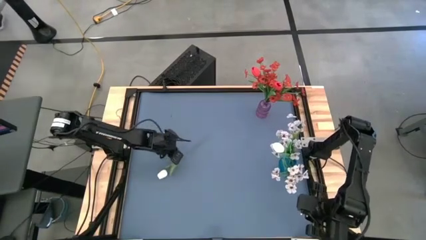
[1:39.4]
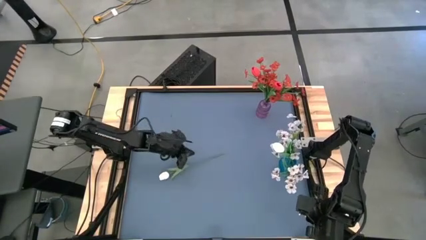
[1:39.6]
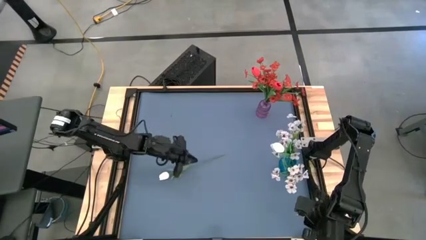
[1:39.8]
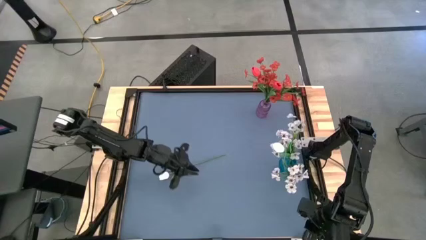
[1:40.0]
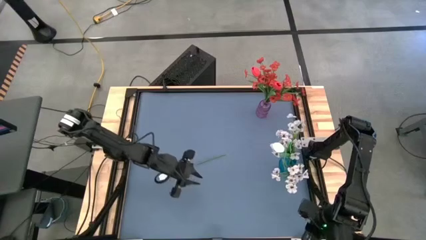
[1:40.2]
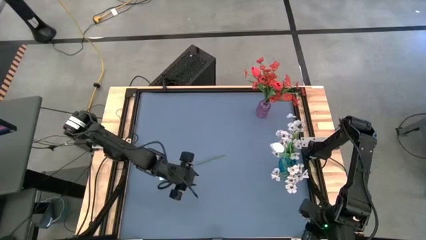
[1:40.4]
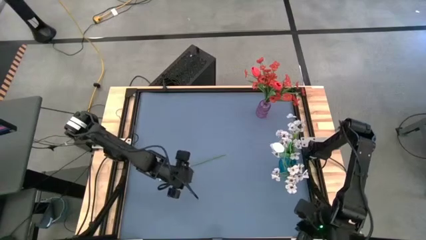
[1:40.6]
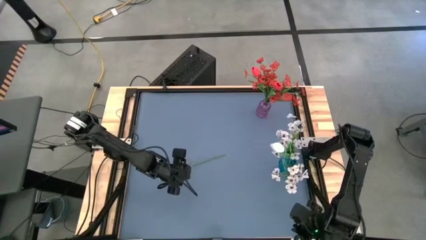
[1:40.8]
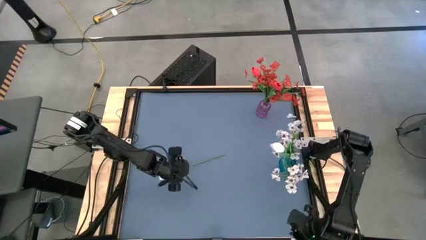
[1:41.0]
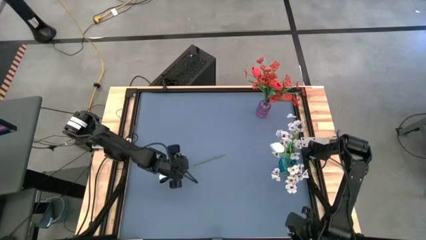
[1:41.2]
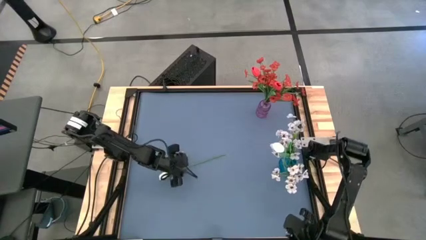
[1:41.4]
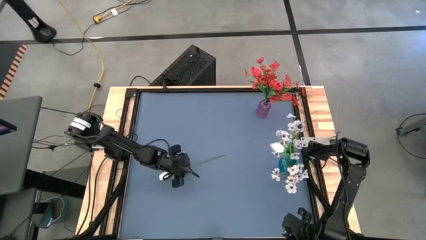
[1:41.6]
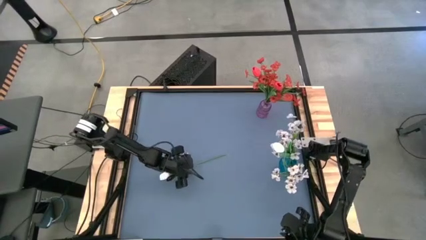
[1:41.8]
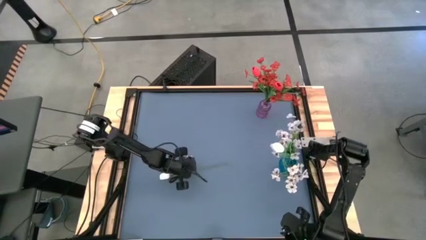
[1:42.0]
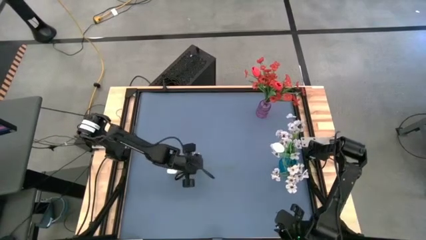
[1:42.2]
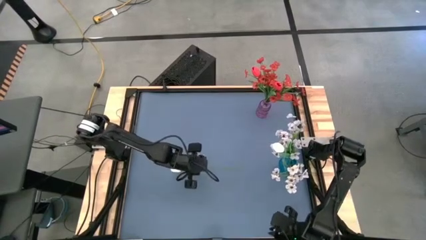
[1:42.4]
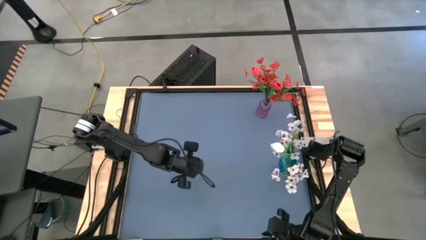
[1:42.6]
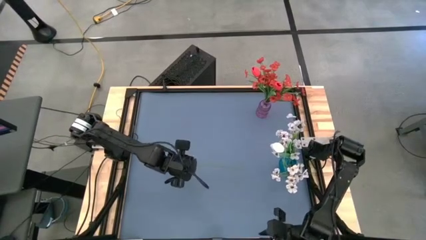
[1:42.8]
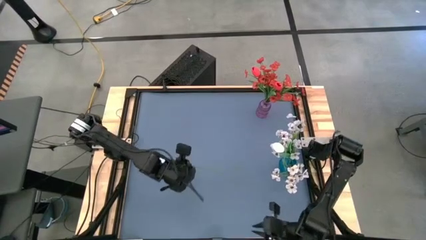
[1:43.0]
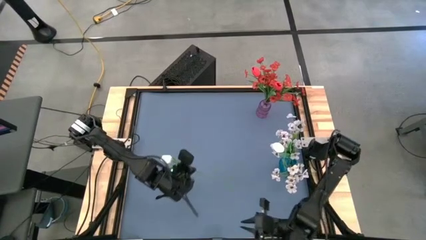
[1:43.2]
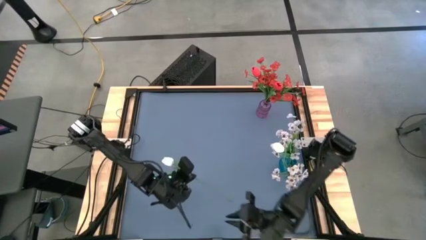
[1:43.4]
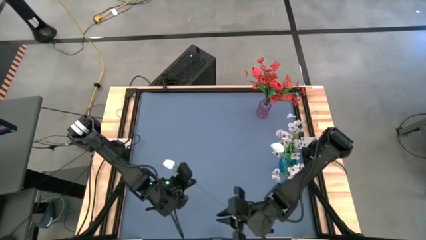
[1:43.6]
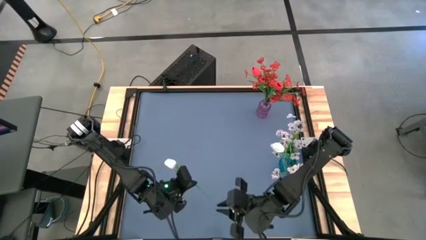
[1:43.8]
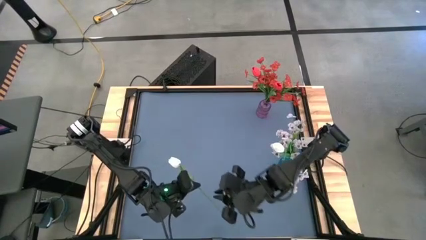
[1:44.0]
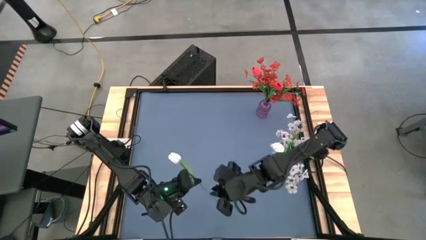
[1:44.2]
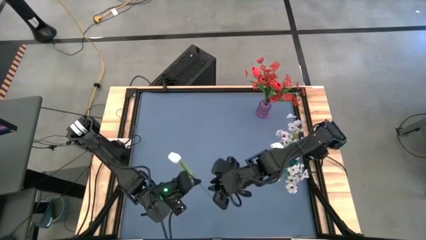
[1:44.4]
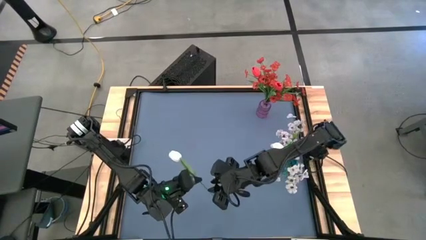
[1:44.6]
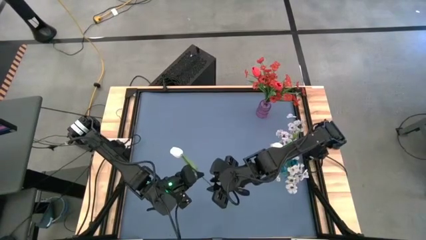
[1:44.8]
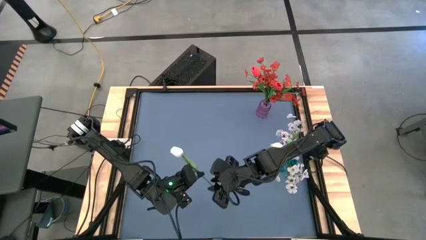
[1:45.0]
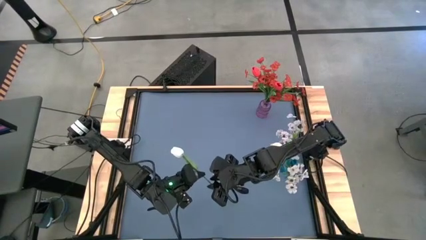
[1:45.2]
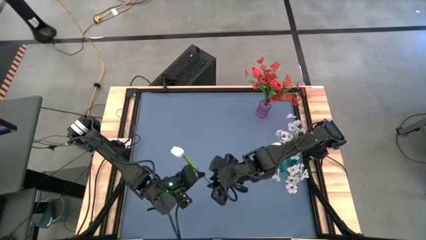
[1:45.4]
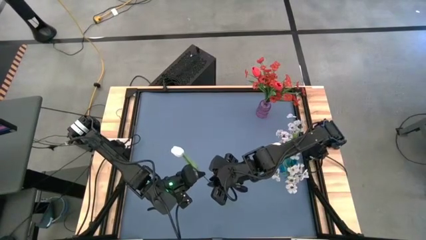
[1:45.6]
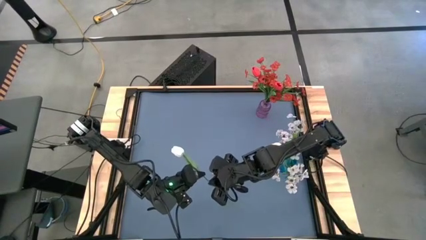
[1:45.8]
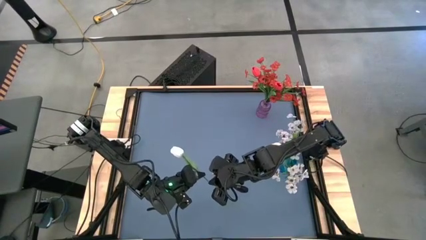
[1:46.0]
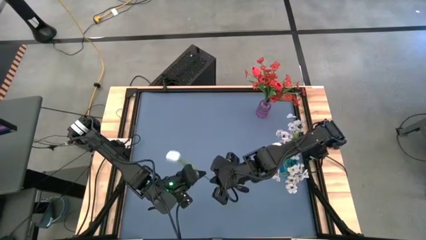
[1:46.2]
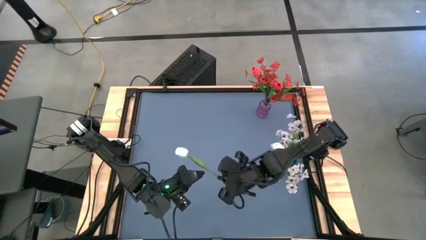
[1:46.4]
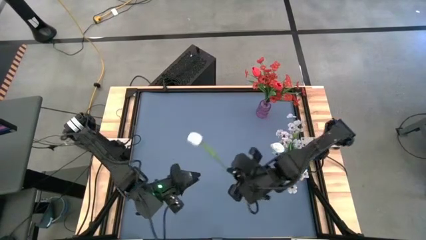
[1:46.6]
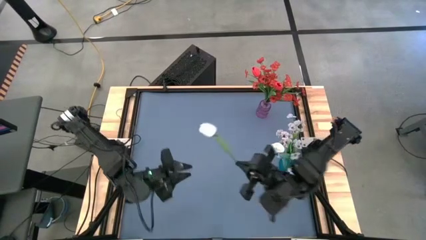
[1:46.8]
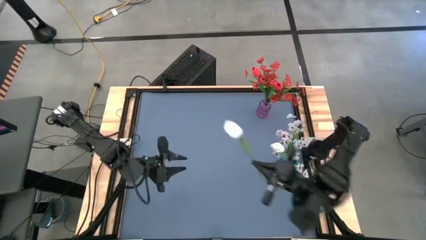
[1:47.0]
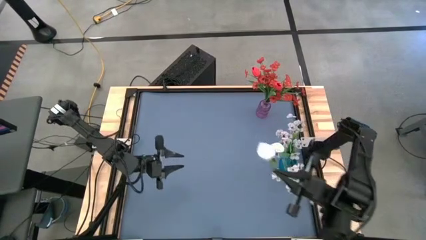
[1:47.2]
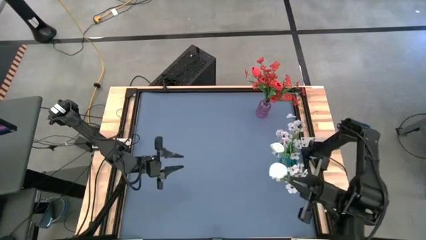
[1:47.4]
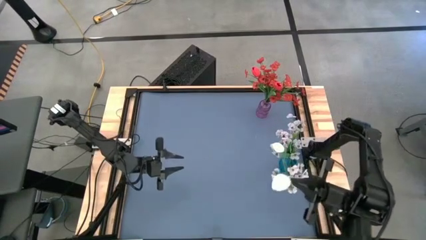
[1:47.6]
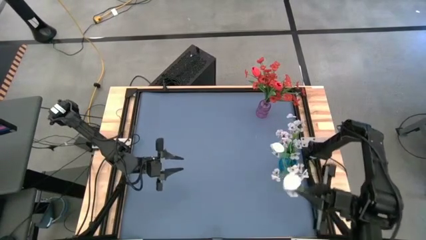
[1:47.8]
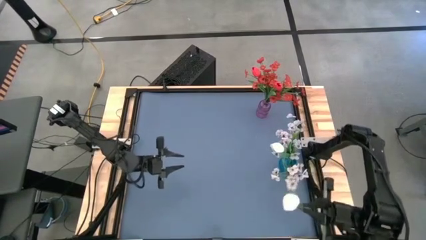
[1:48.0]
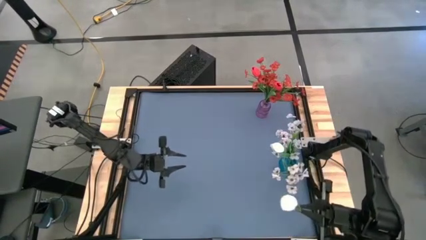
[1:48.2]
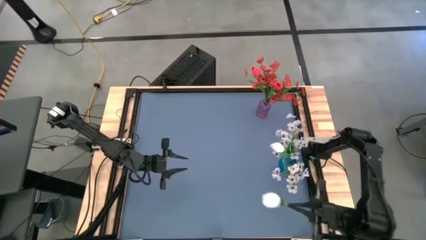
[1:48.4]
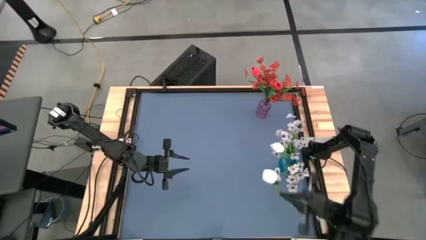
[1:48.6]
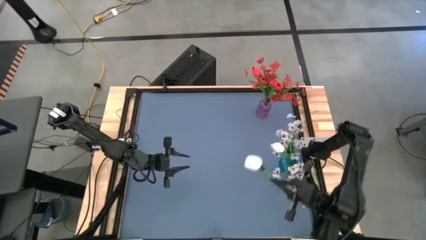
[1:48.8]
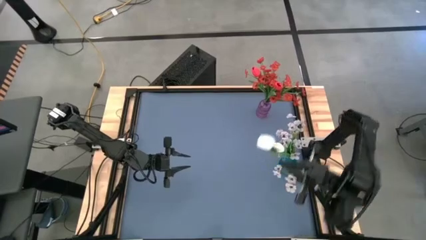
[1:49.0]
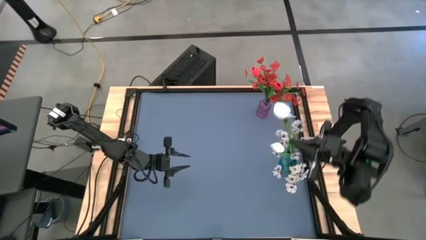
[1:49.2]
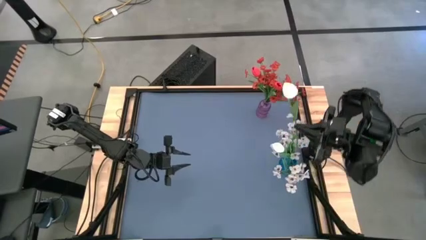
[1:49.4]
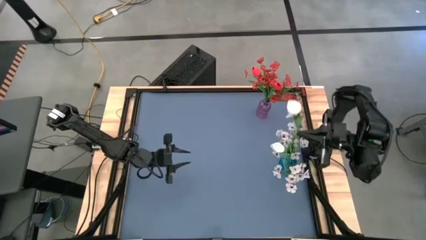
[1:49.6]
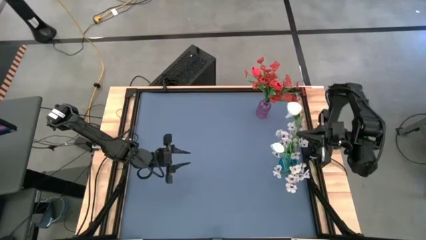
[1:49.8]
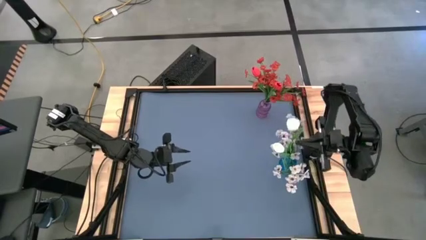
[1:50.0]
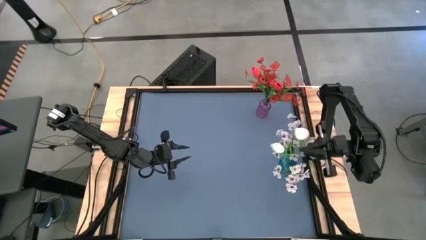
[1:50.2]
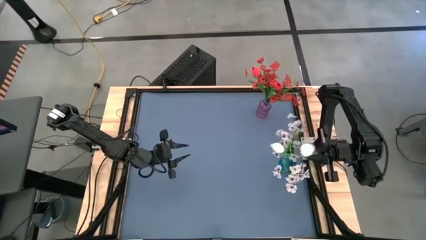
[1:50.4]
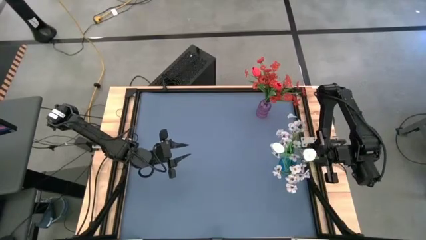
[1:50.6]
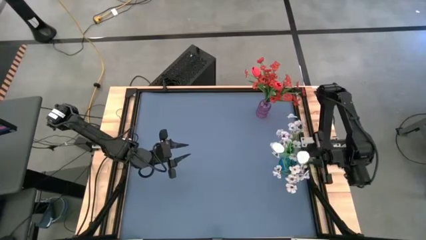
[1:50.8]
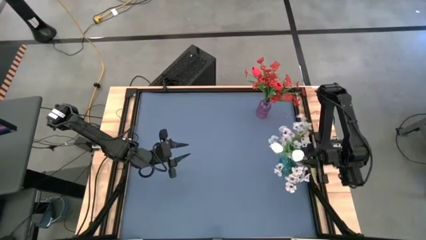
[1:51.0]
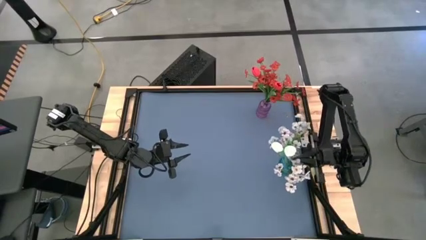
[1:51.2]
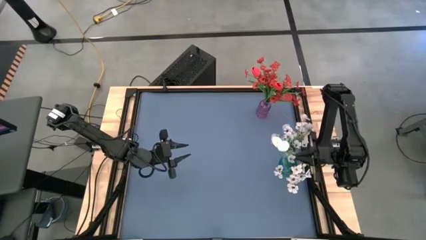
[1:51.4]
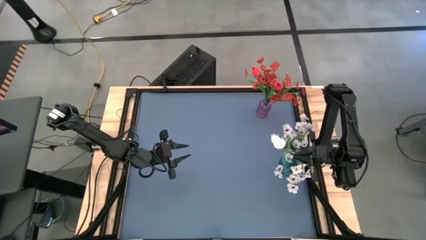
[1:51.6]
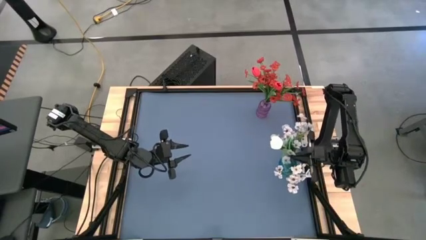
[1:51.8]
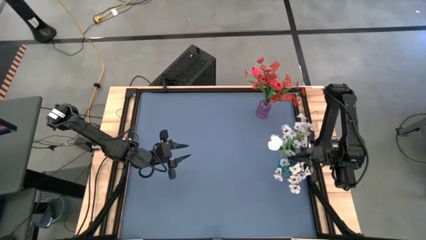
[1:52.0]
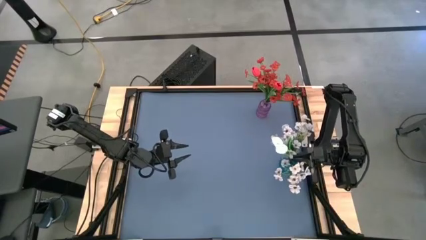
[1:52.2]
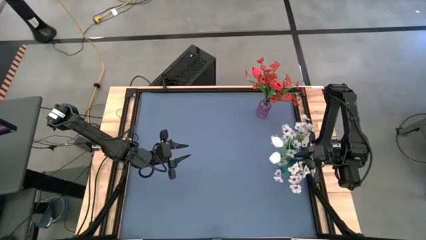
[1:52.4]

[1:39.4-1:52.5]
Task: Sort flowers into vase by color
Put the white tulip into the blue vase
